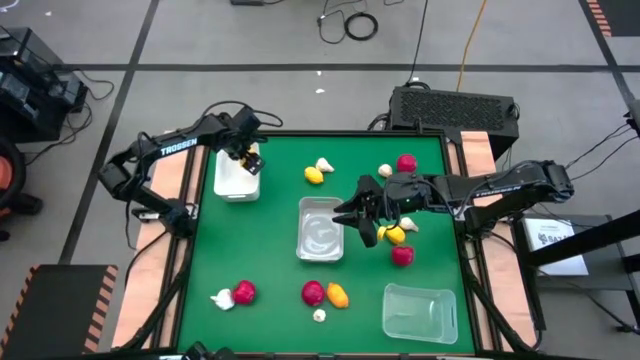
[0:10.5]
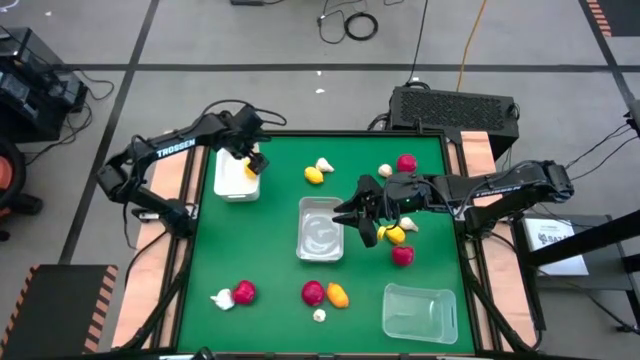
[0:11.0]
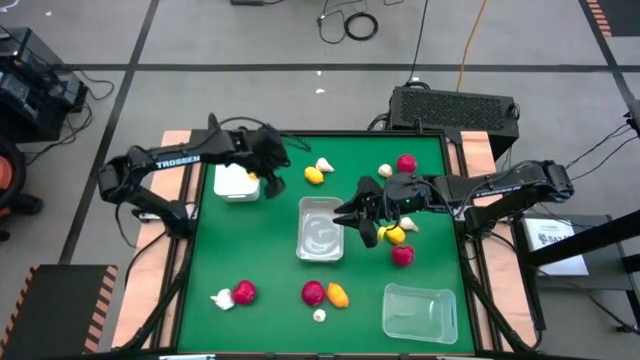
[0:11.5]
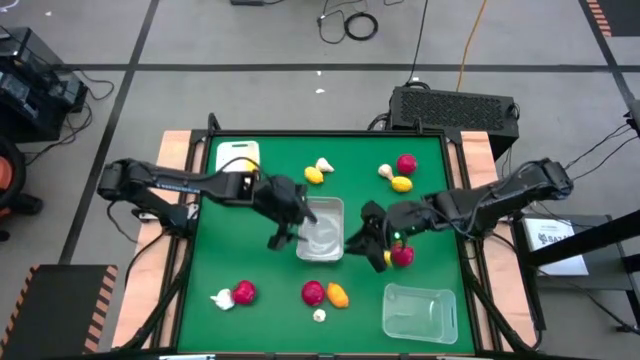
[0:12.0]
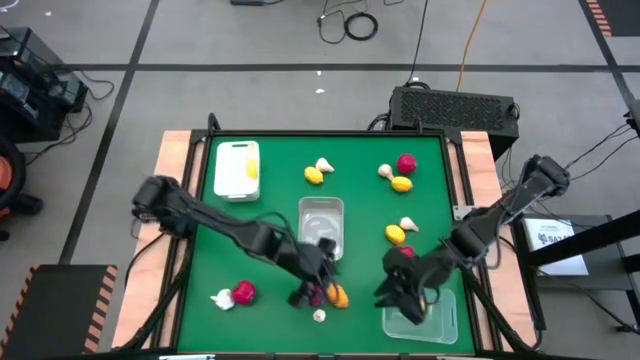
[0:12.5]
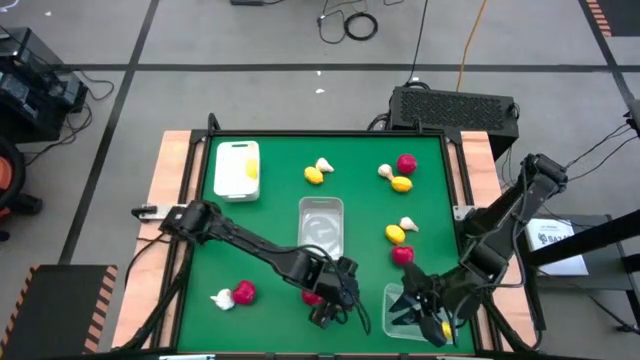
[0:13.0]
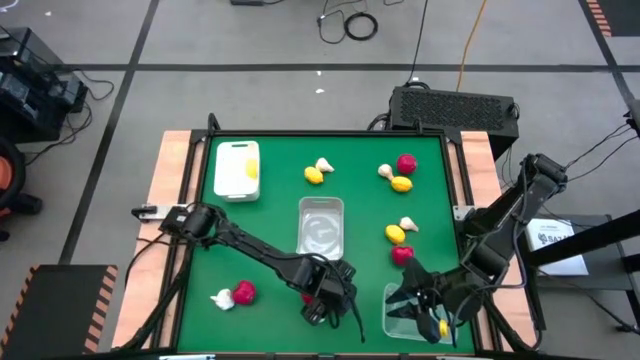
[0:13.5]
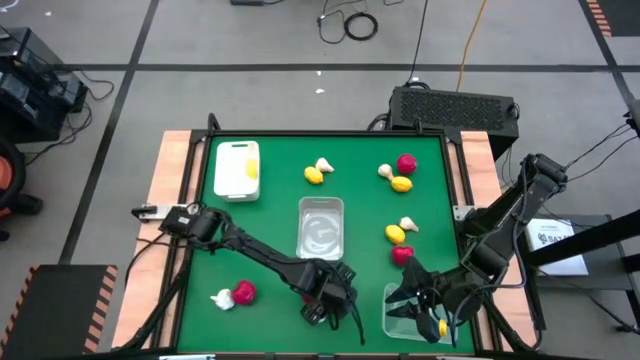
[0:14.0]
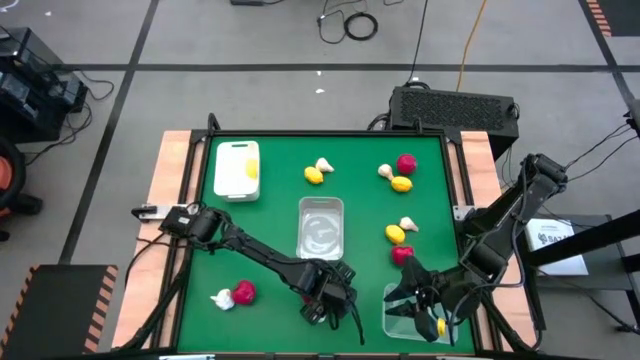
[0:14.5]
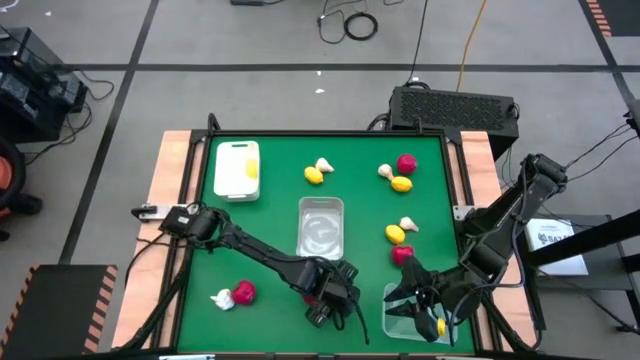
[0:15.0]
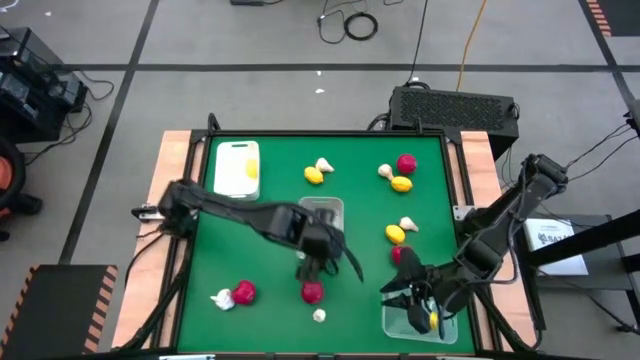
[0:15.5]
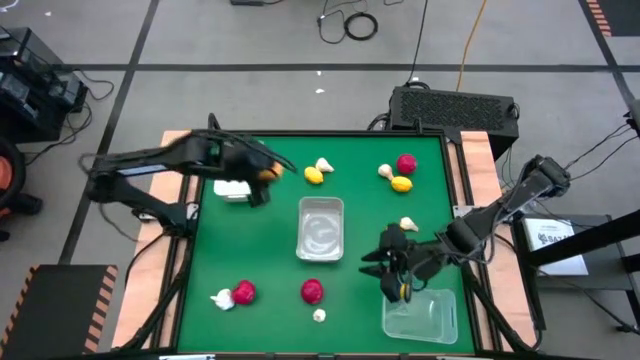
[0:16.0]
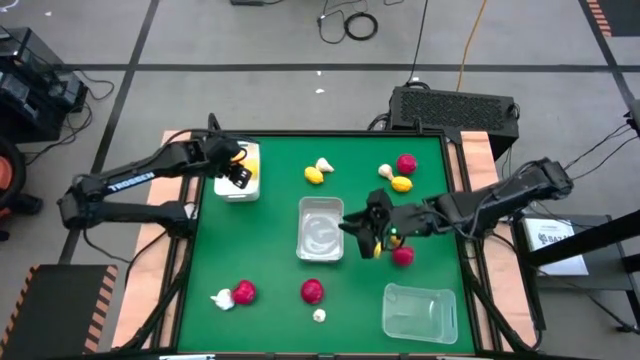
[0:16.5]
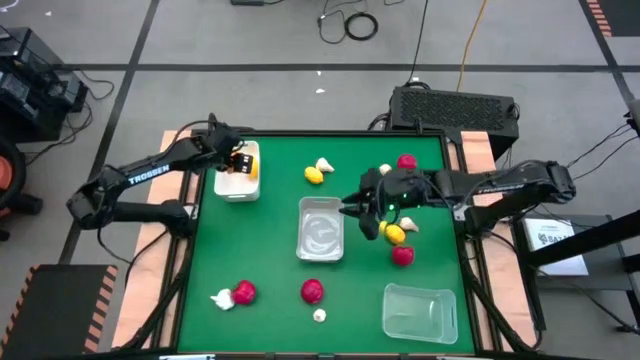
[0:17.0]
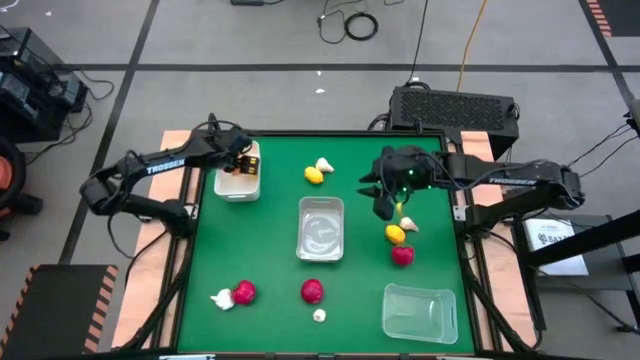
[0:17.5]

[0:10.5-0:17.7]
Task: Sort produce into baskets
Put the lemon into the white bin

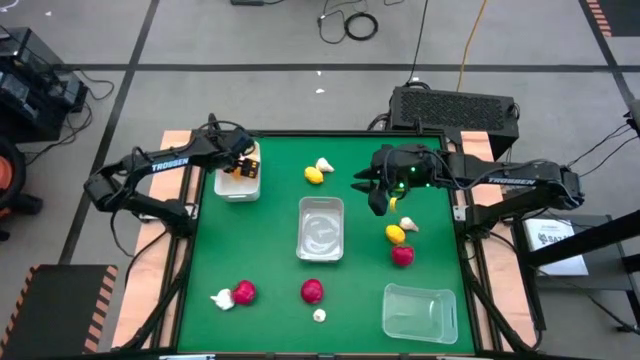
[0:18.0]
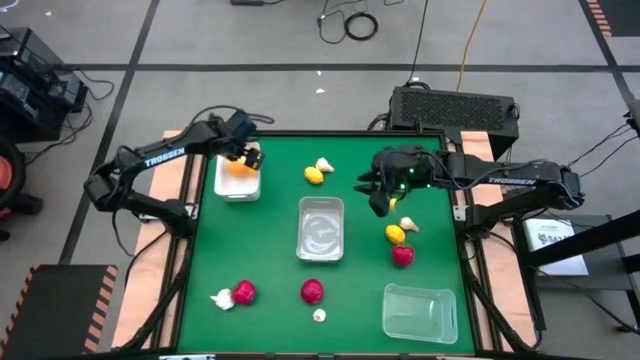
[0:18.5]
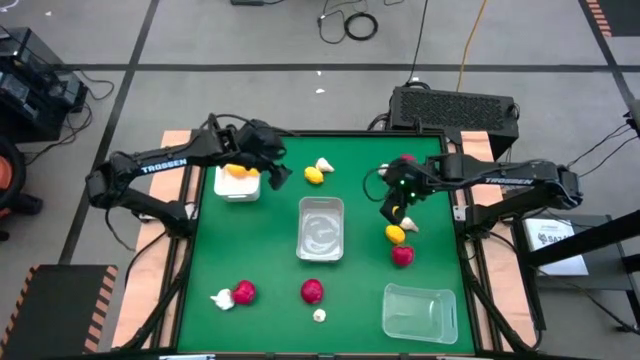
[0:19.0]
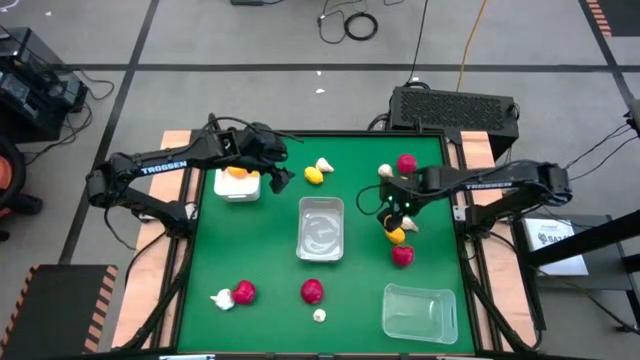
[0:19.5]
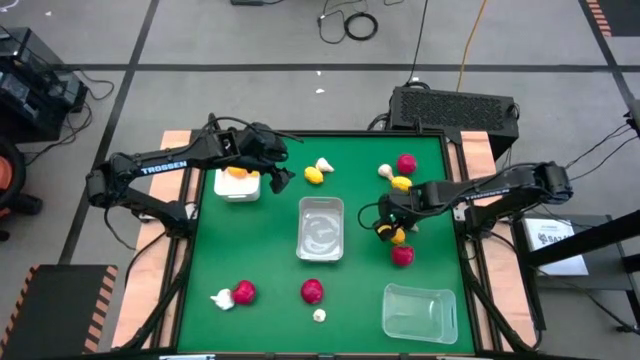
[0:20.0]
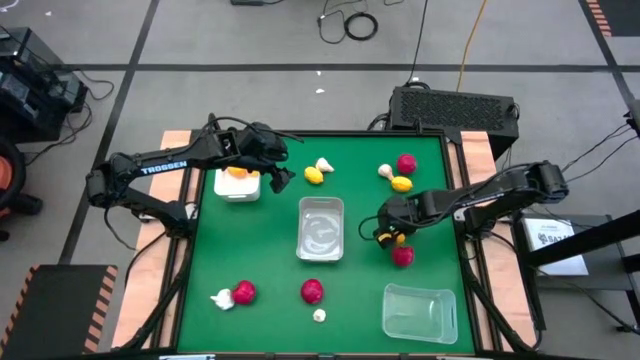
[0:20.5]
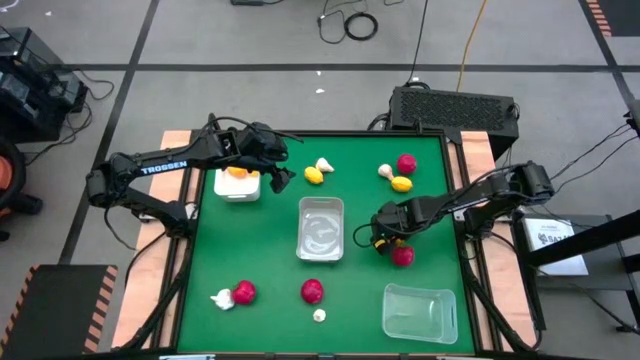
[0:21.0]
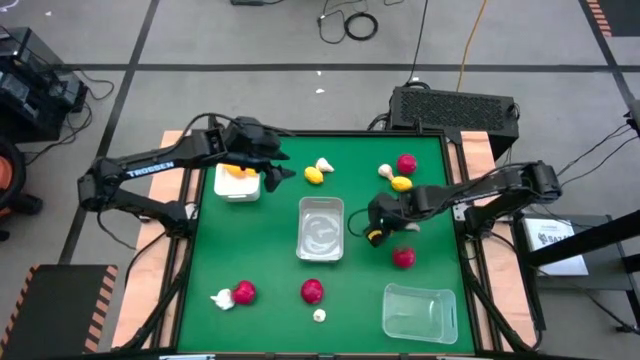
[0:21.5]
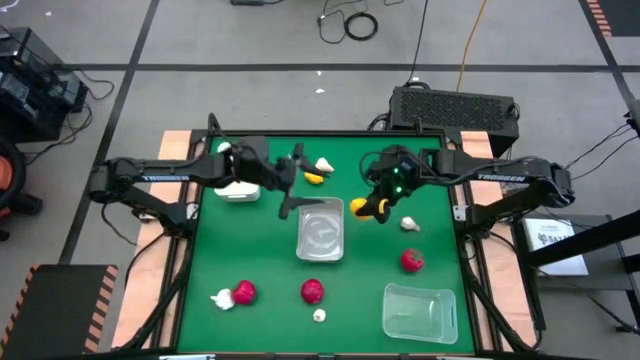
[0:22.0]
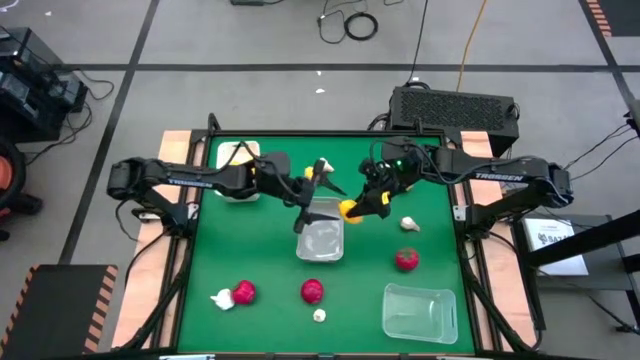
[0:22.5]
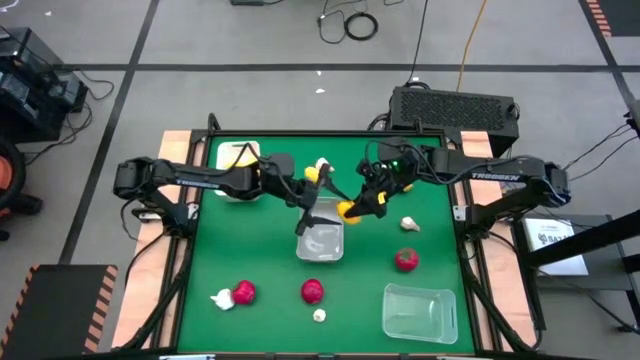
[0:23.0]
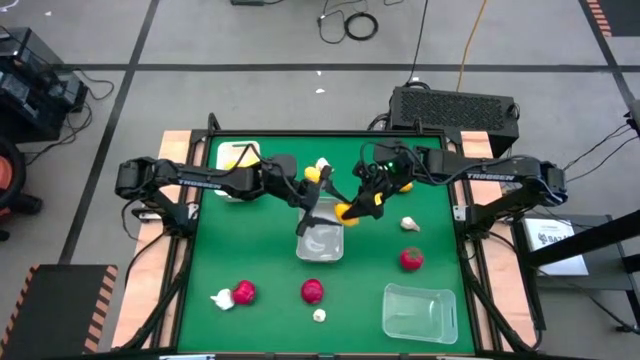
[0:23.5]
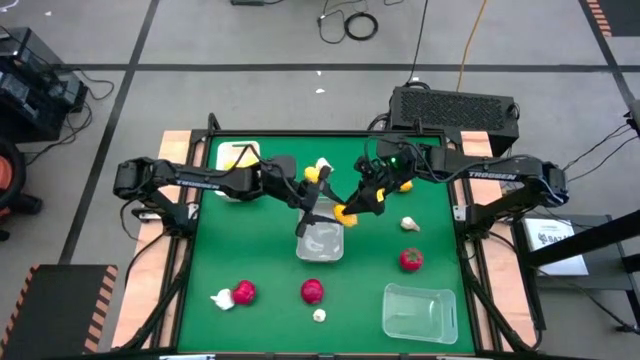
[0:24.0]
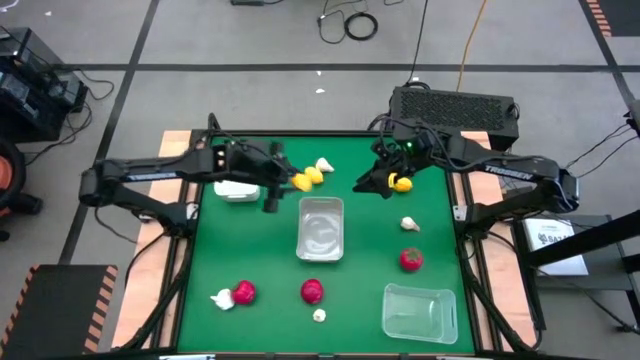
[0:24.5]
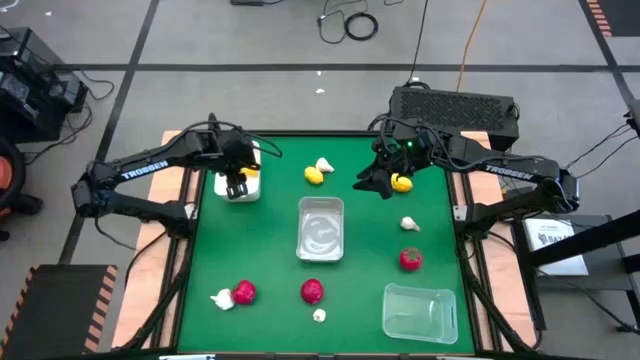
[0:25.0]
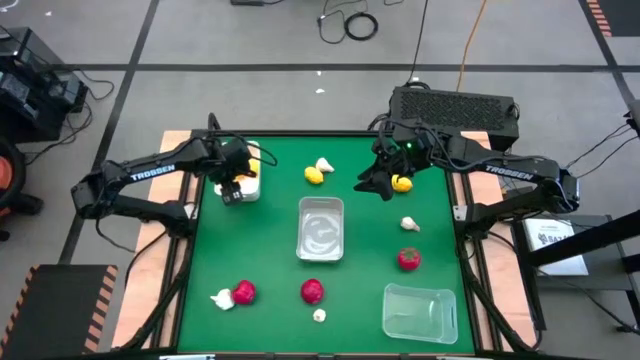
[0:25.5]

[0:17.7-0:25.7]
Put the lemon into the white bin

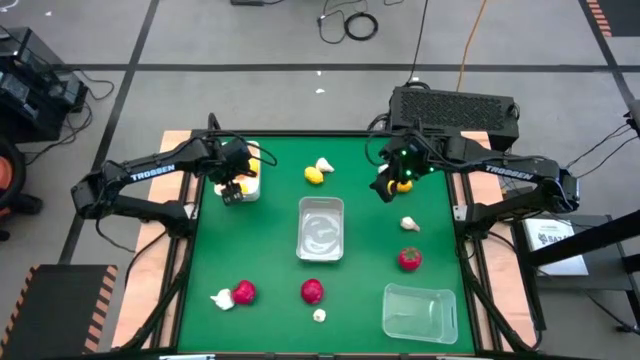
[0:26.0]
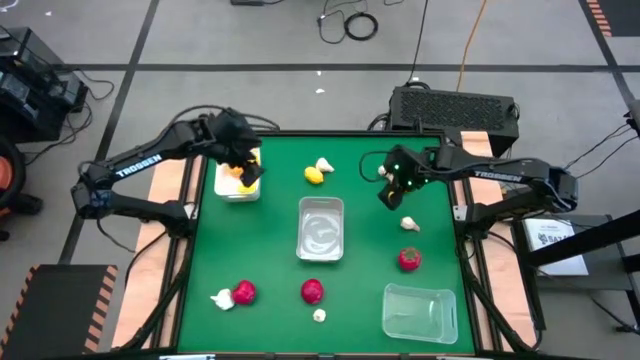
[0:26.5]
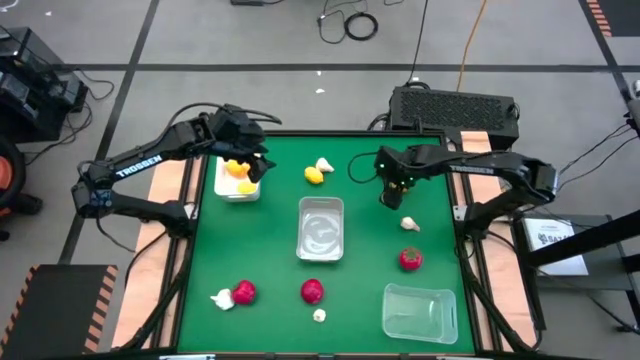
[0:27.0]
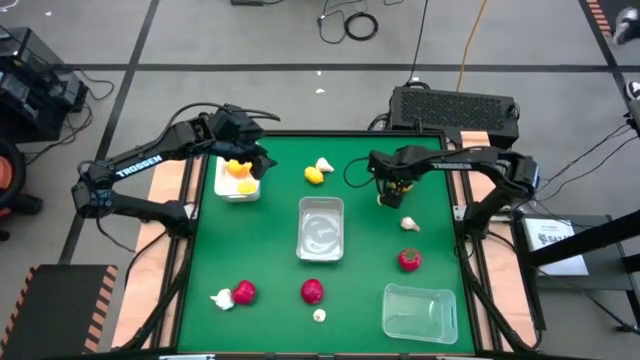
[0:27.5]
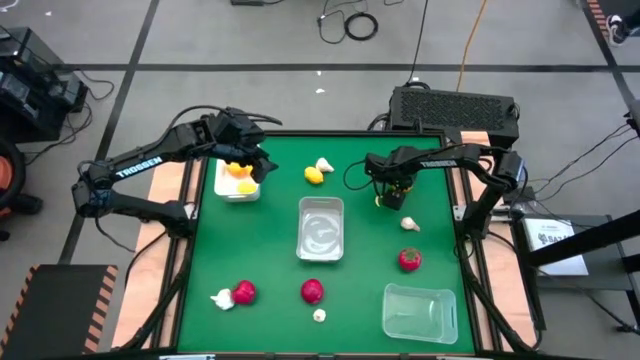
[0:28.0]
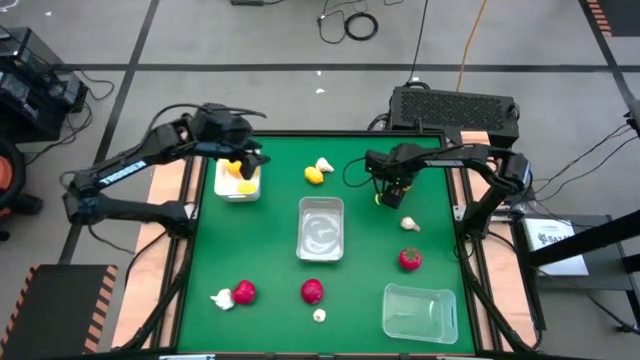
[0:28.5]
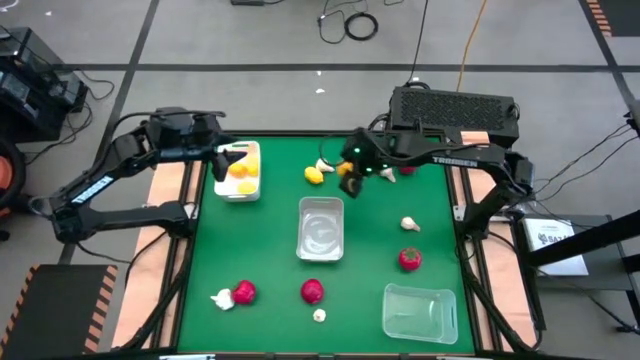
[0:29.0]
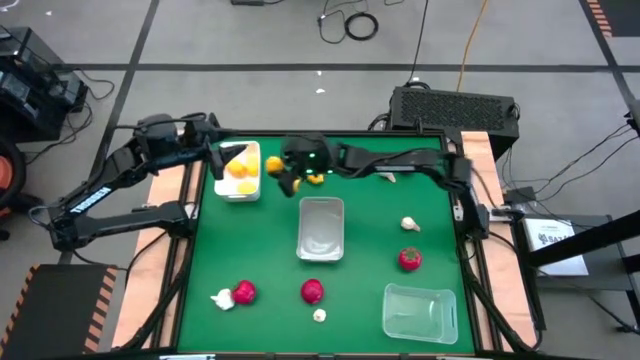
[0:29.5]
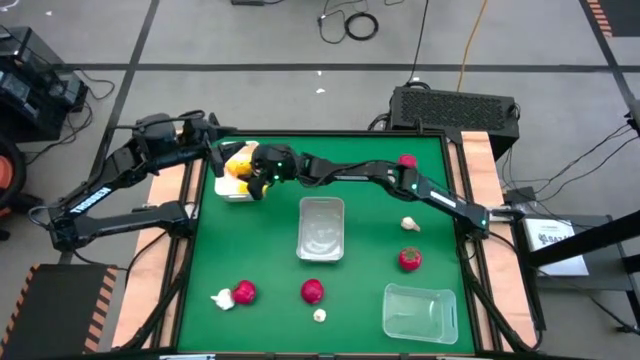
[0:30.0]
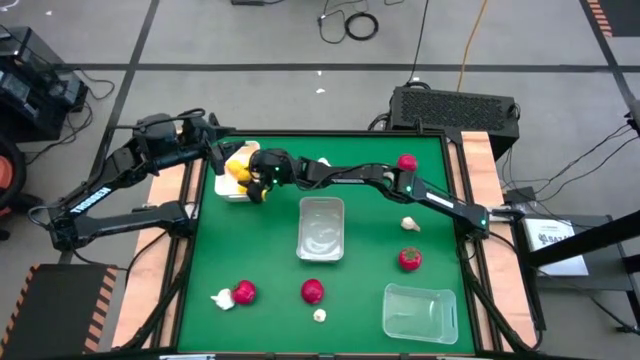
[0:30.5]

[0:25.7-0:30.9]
Put the lemon into the white bin

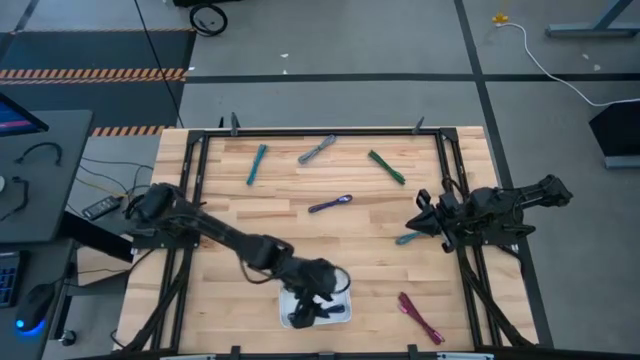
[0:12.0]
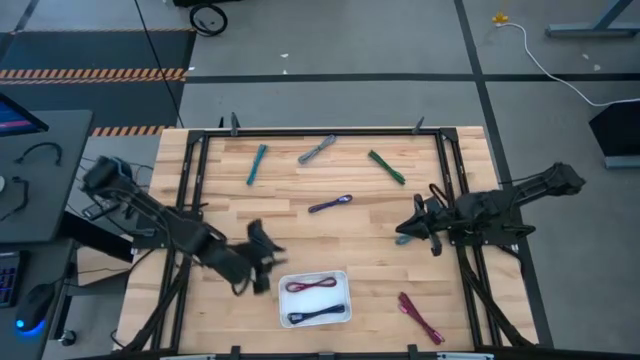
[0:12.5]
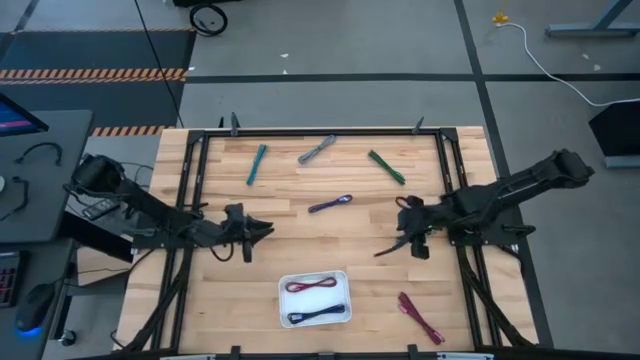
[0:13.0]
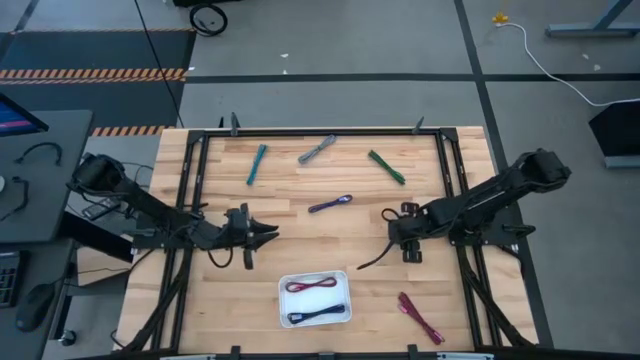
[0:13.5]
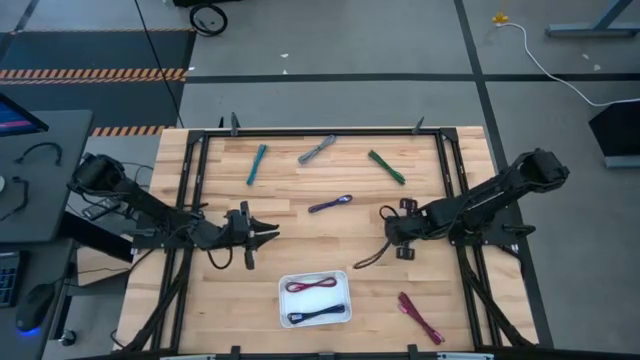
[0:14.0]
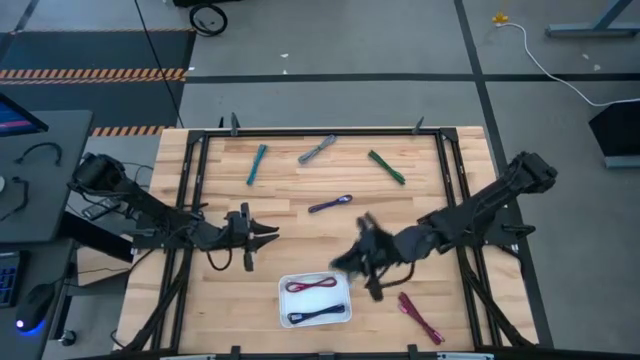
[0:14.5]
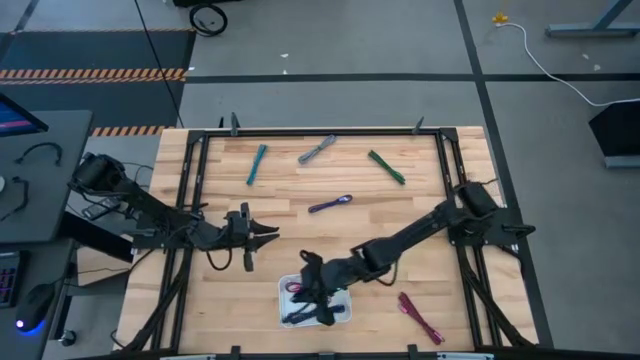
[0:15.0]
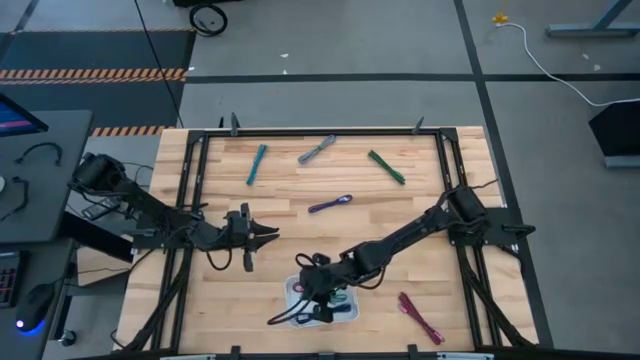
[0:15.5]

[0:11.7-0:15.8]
Task: Pick and place USB-C Cables
Put the right light blue USB cable into the white bin
